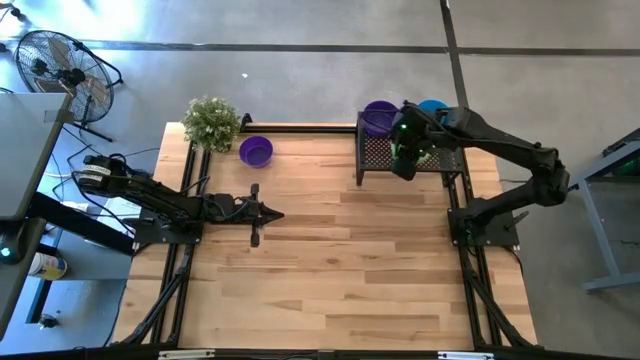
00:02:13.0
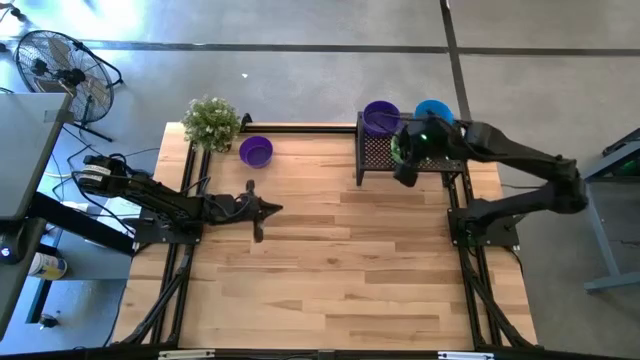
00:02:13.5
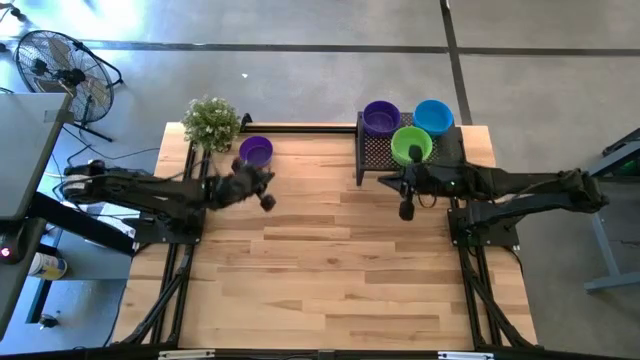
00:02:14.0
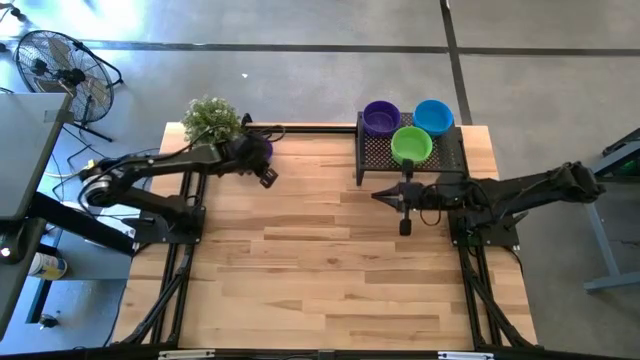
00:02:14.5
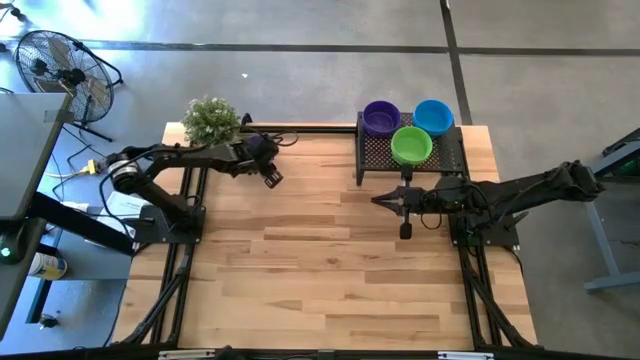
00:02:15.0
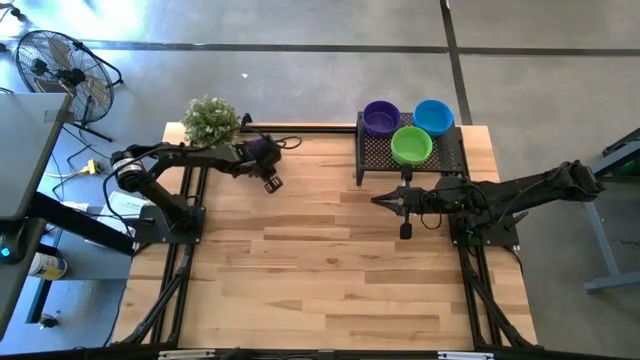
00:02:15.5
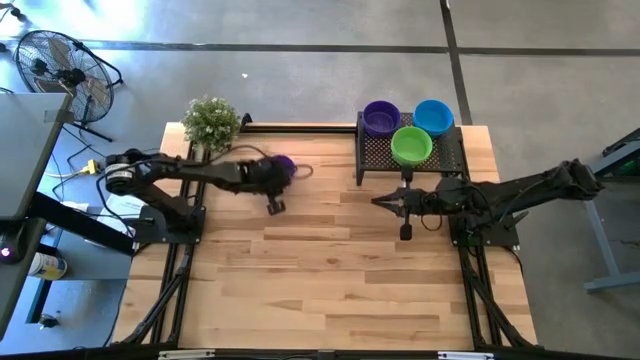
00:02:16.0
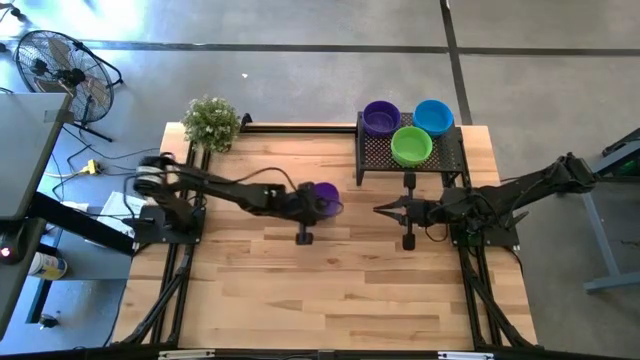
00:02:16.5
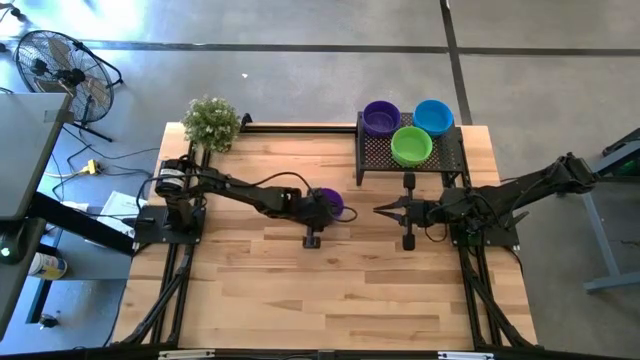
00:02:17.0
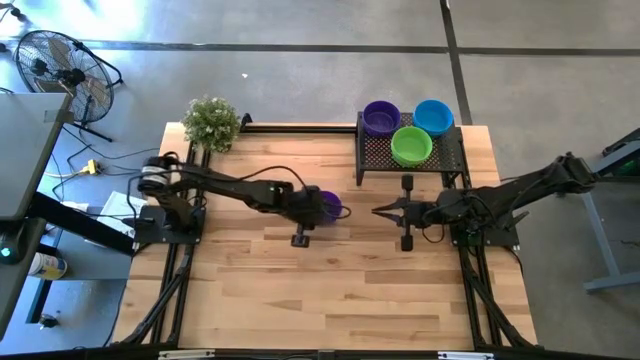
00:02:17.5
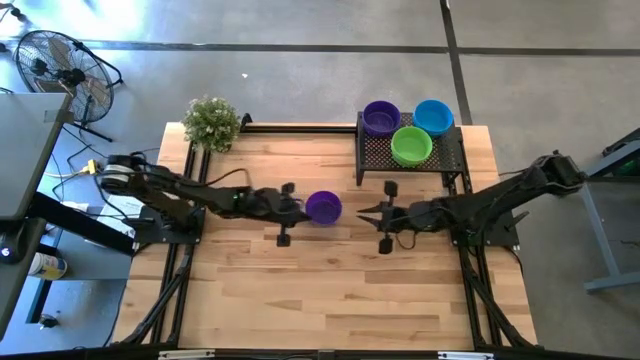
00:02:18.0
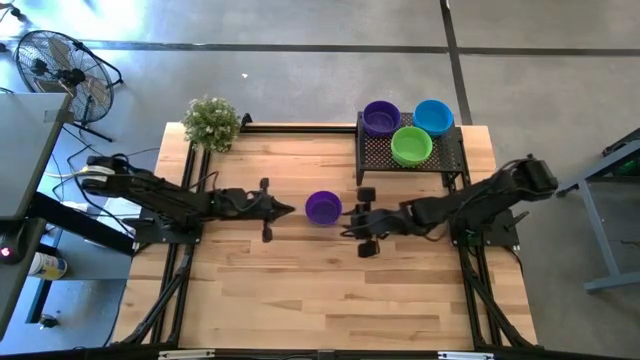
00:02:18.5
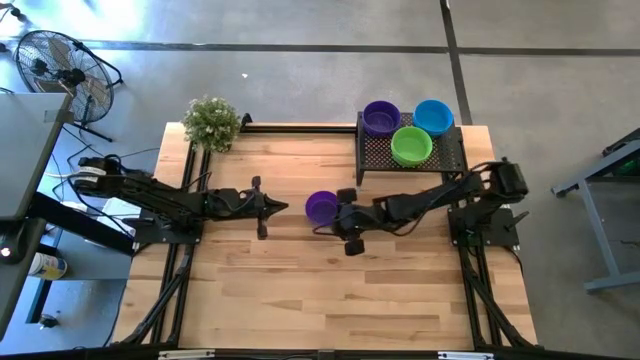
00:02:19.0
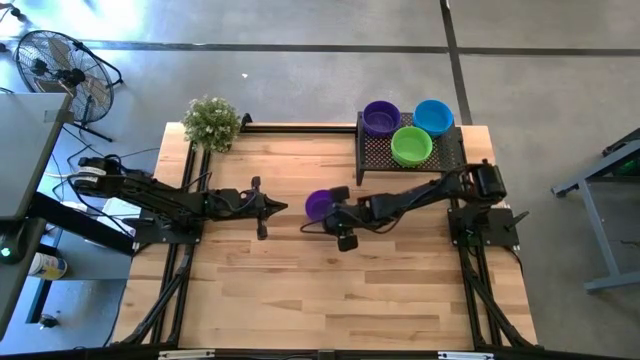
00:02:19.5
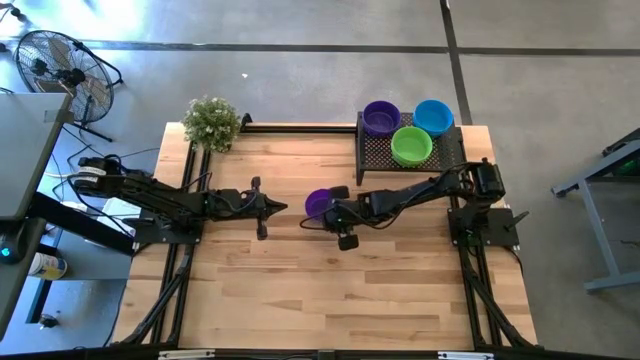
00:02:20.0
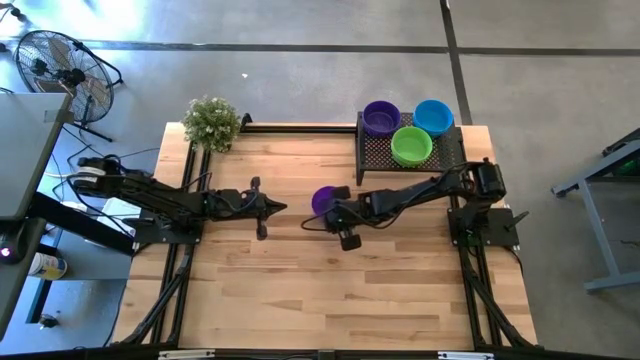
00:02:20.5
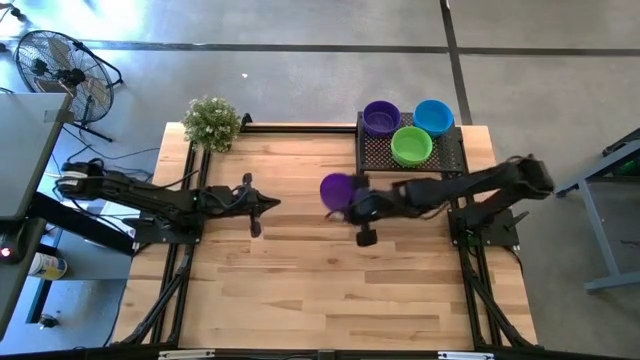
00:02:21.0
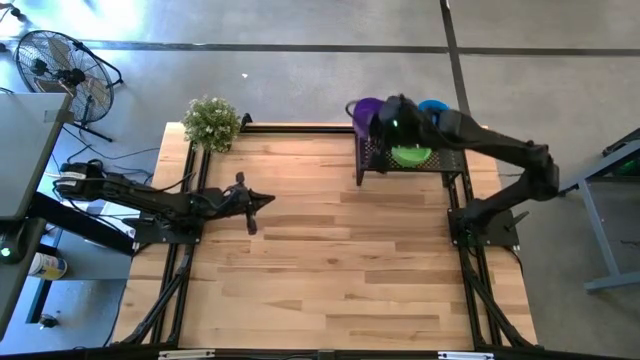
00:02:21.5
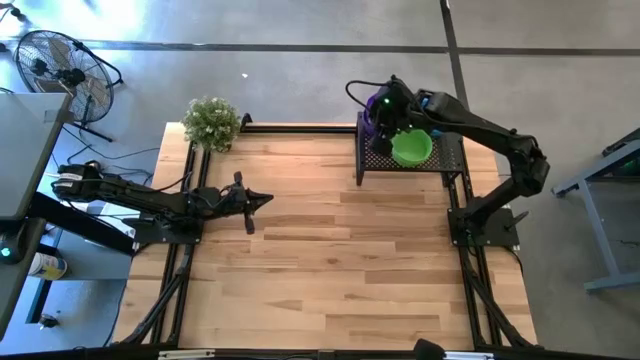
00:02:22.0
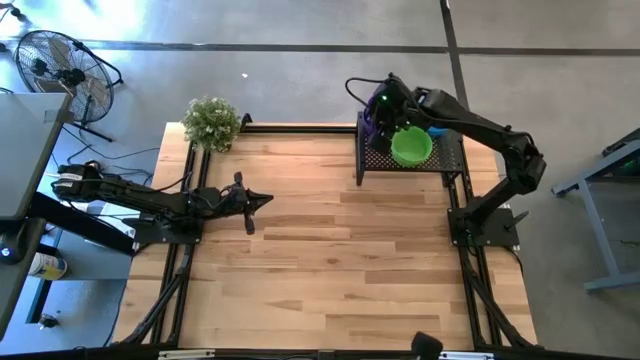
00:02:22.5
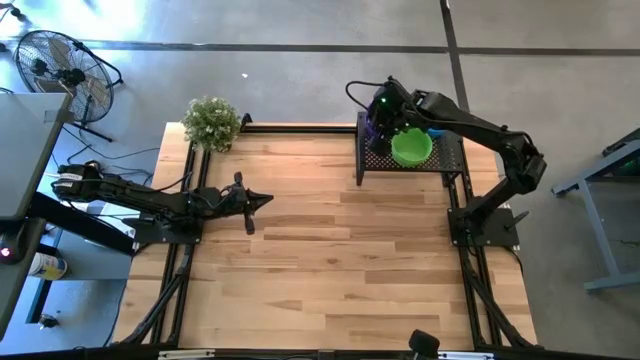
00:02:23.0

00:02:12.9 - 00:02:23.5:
Task: Pick & Place Mini bowls
Stack the violet bowl on the other violet bowls on the shelf

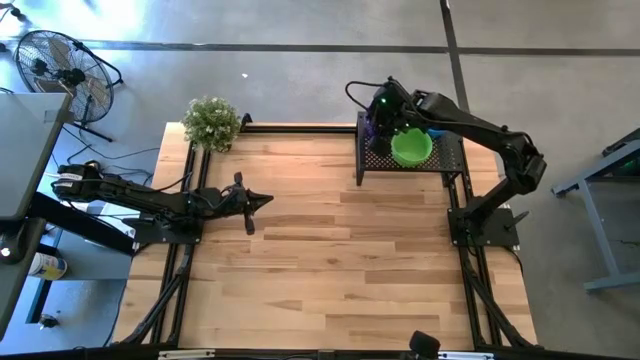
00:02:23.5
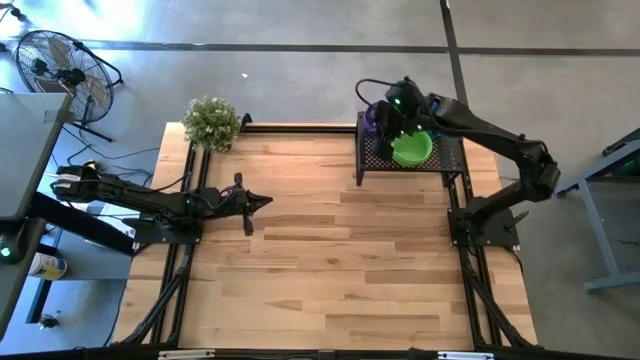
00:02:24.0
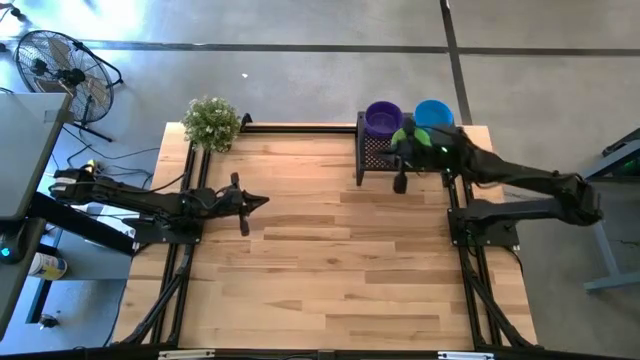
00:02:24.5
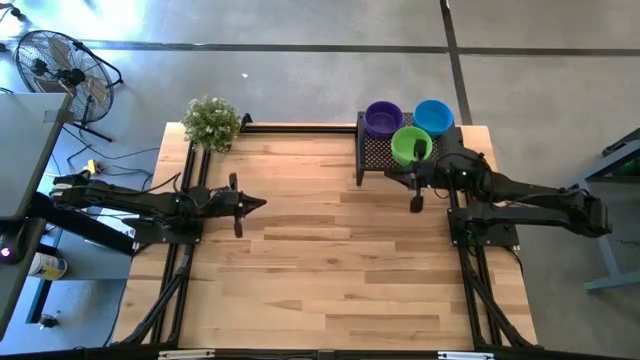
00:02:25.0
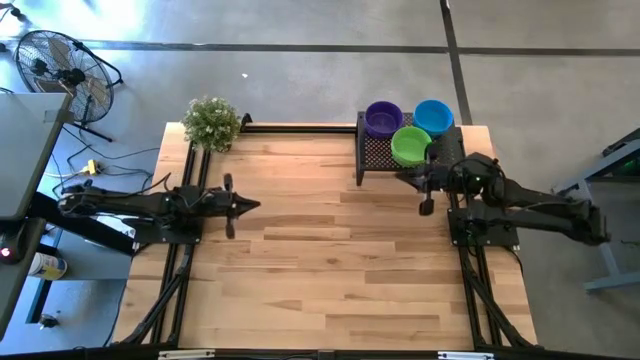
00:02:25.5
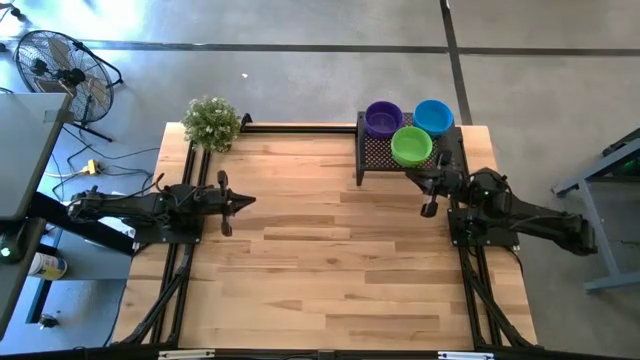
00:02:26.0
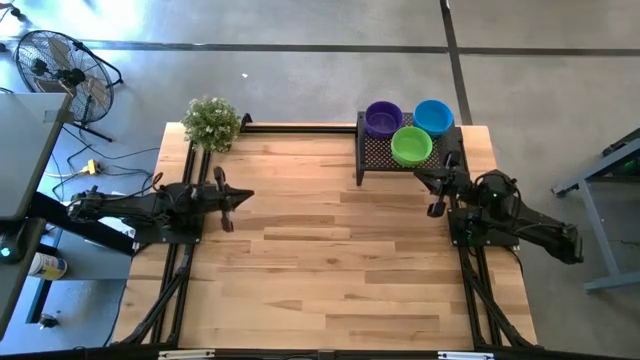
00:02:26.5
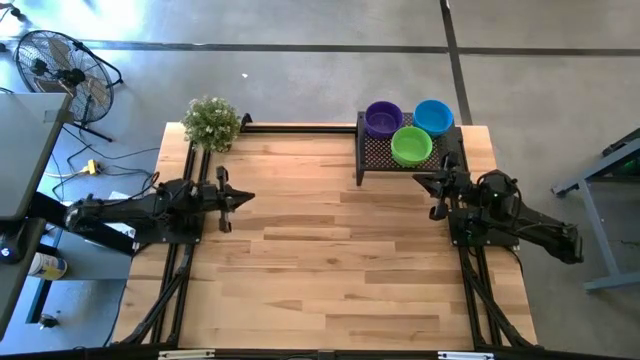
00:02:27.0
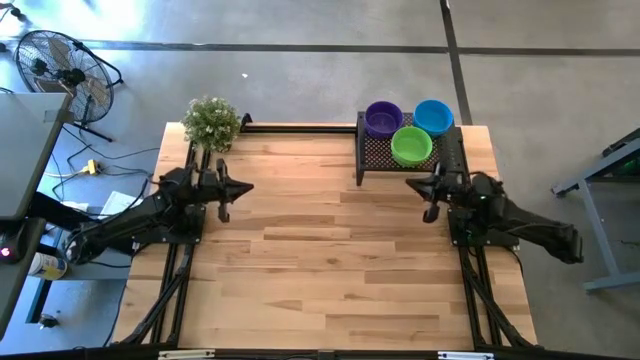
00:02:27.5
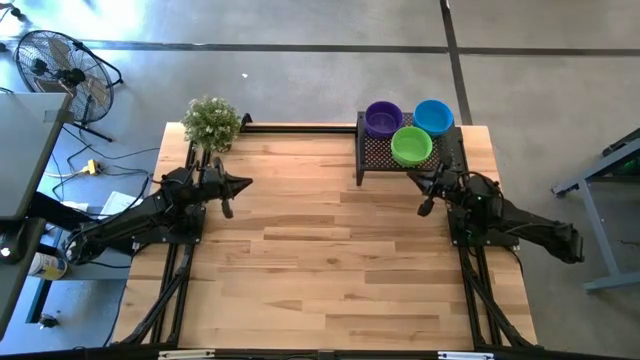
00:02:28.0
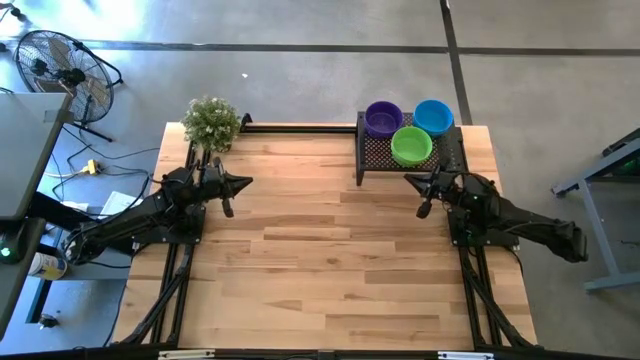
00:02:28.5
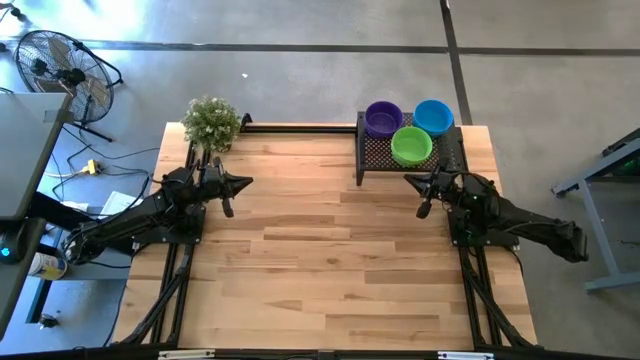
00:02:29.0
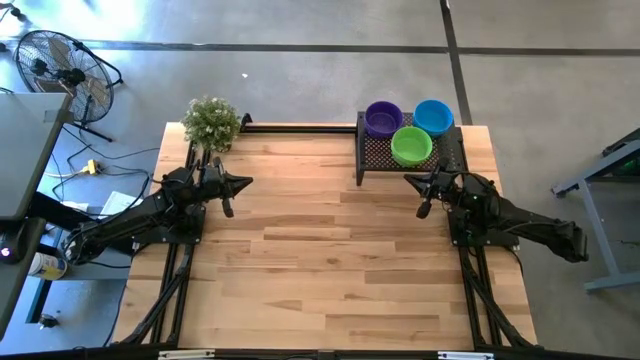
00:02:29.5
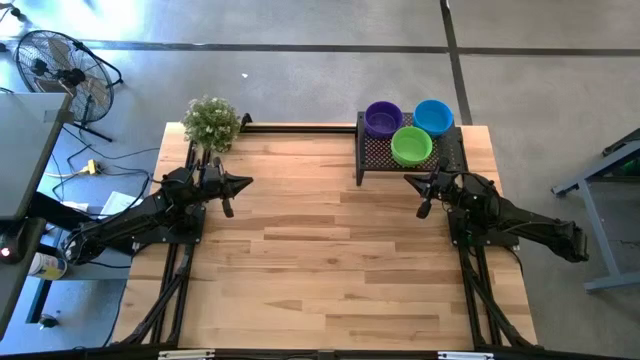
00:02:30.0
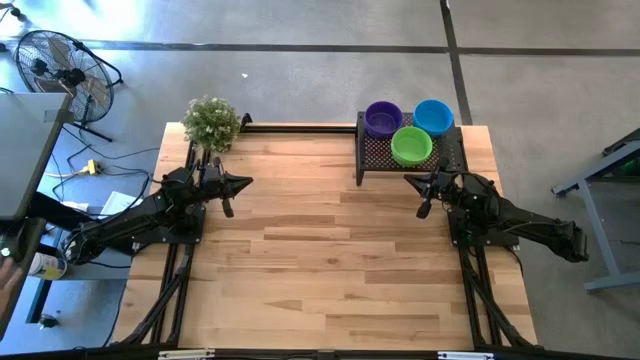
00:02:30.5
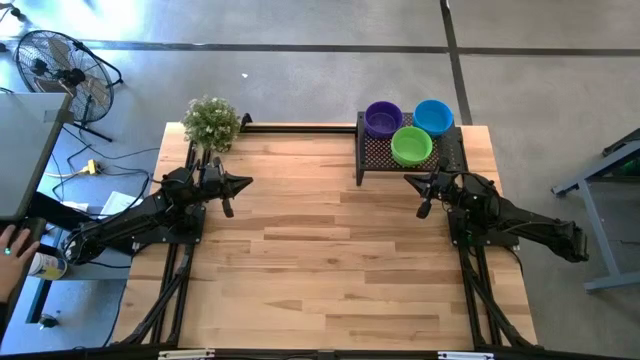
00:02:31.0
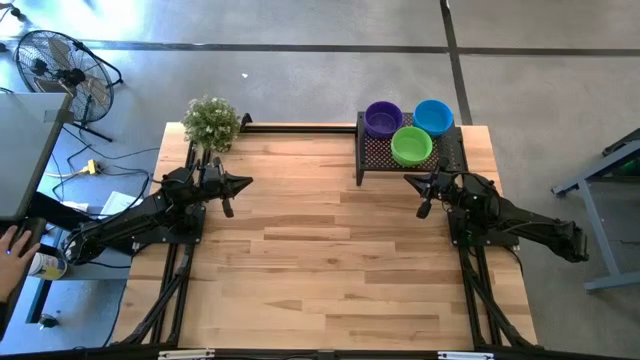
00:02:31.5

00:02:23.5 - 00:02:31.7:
Return to Home Position

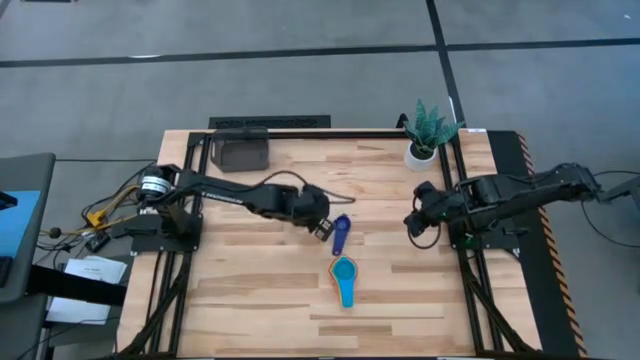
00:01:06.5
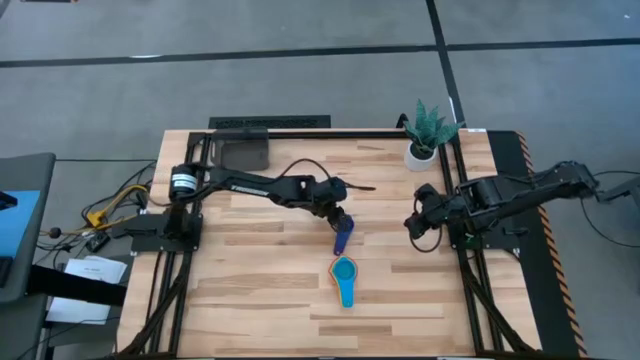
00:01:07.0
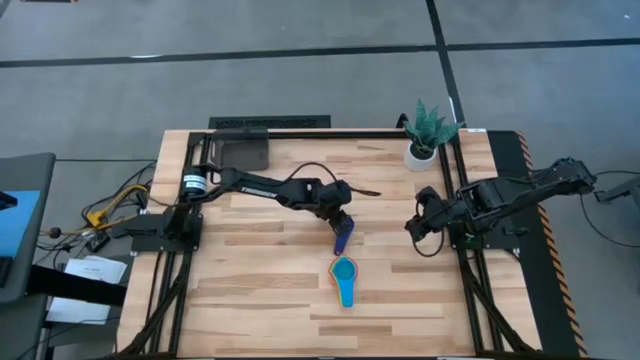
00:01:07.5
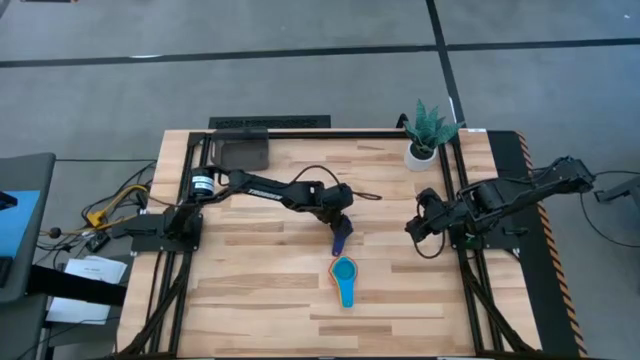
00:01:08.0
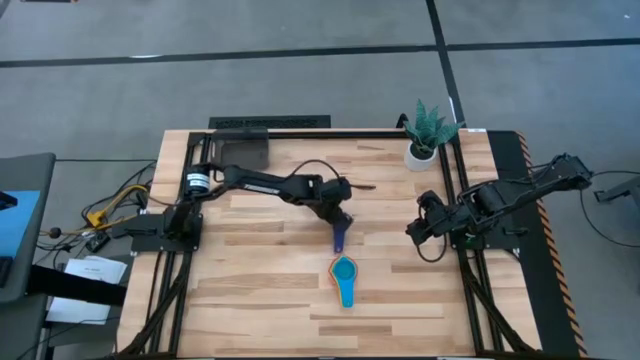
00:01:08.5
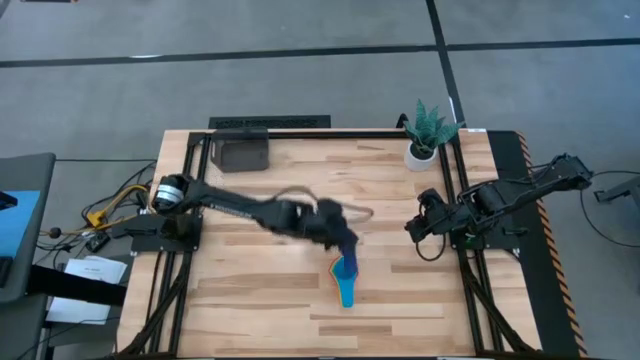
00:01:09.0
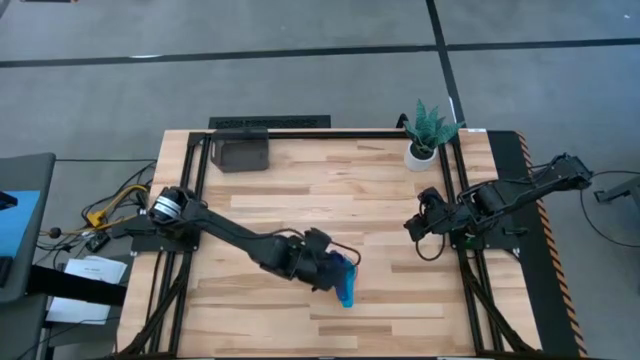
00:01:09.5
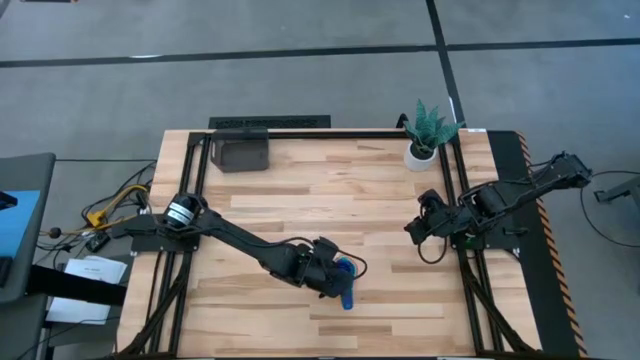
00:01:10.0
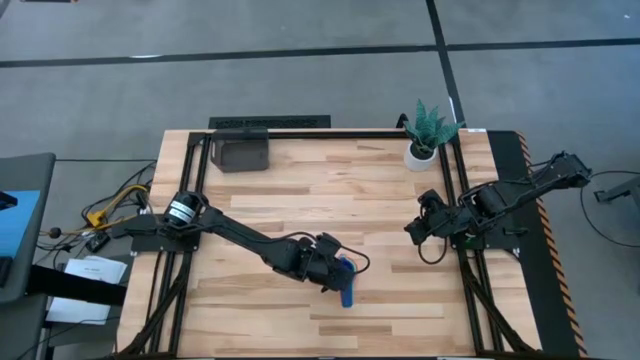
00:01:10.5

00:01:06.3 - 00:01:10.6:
Task: Nest measuring cups in basket
Stack the dark blue measuring cup on top of the light blue measuring cup
